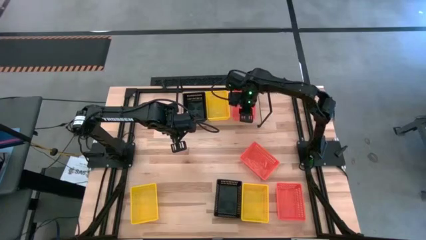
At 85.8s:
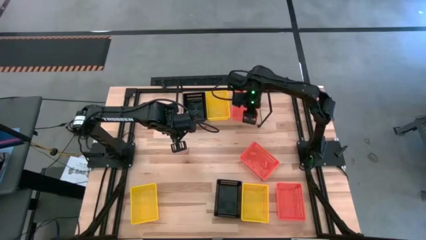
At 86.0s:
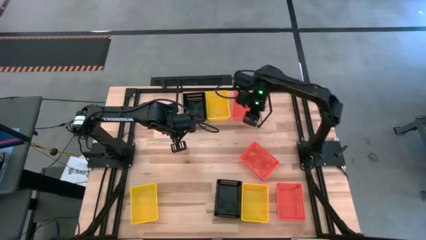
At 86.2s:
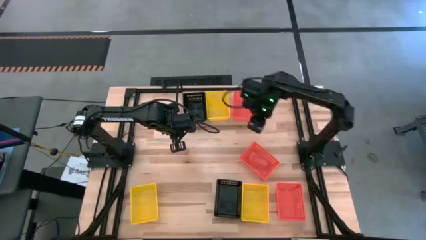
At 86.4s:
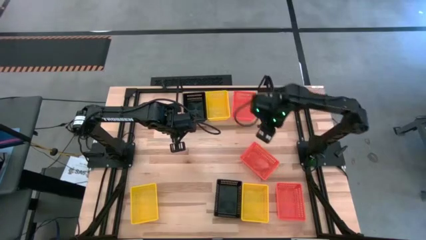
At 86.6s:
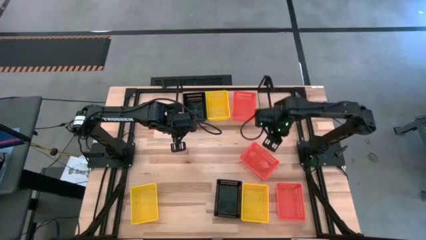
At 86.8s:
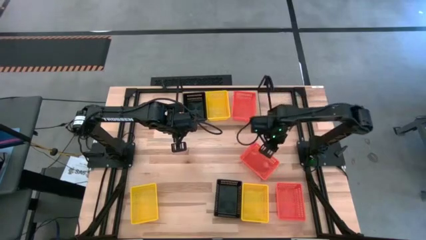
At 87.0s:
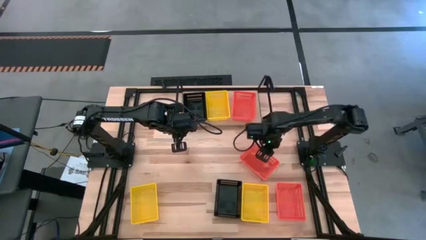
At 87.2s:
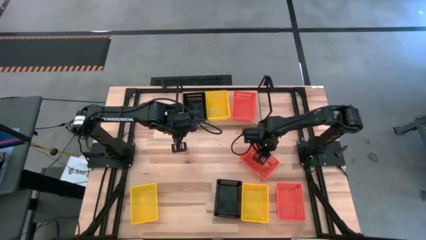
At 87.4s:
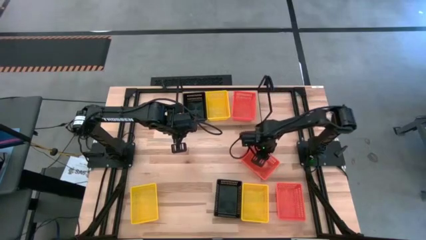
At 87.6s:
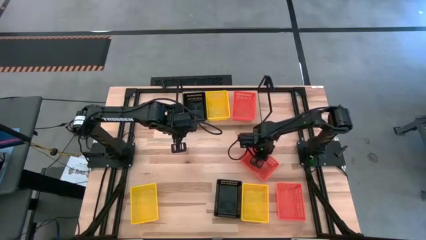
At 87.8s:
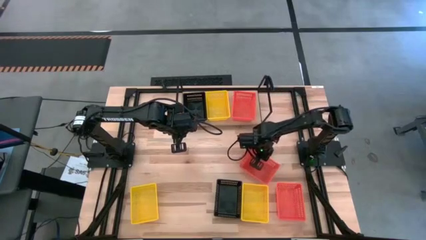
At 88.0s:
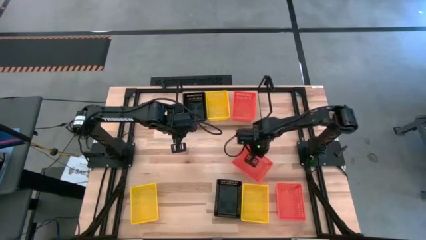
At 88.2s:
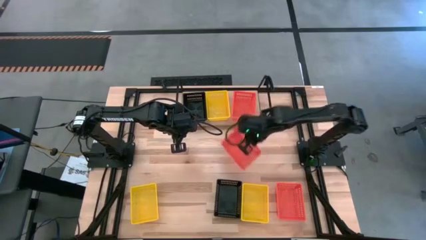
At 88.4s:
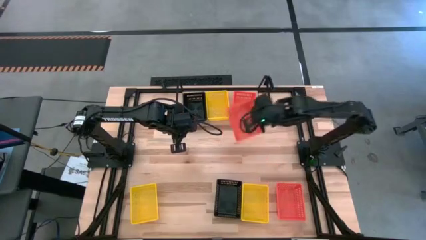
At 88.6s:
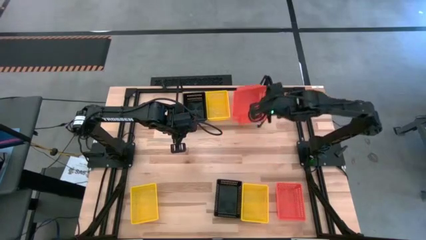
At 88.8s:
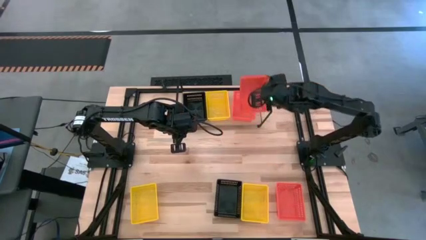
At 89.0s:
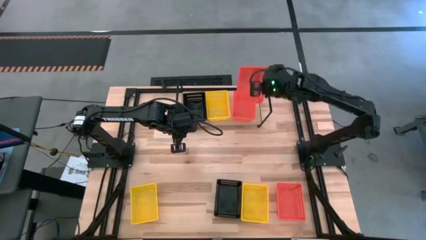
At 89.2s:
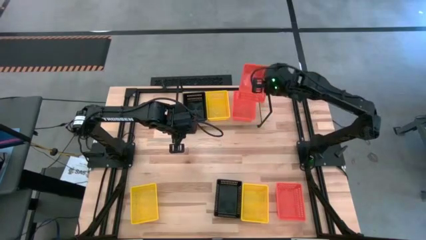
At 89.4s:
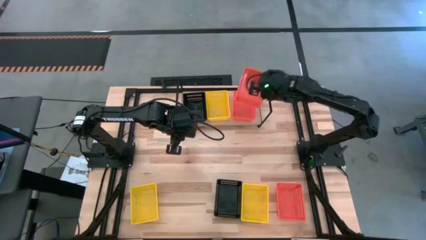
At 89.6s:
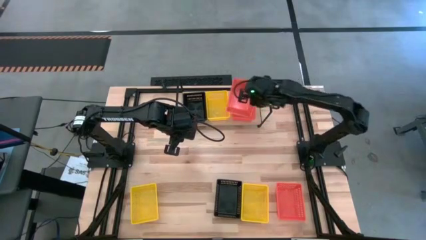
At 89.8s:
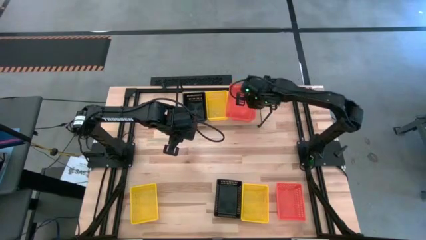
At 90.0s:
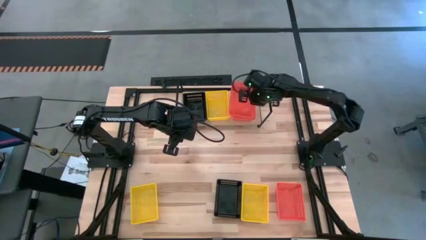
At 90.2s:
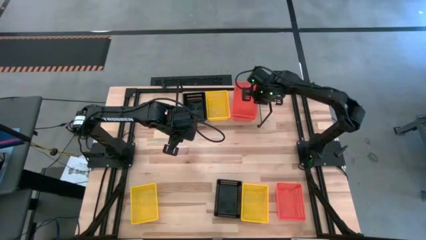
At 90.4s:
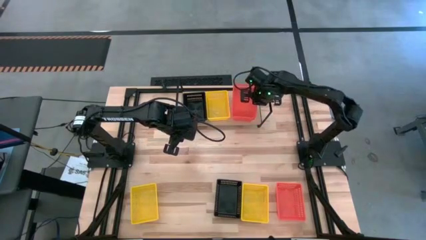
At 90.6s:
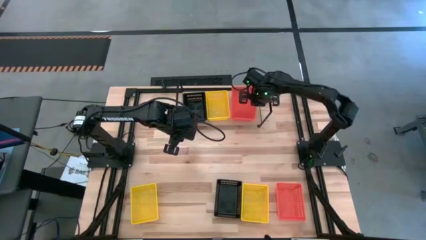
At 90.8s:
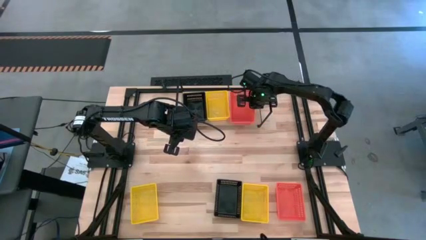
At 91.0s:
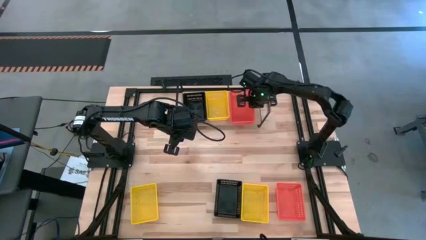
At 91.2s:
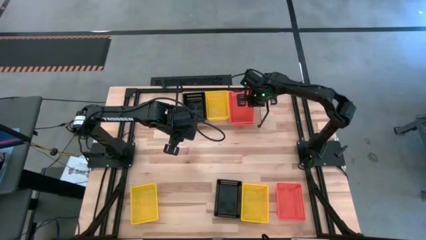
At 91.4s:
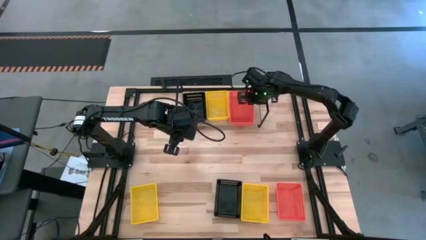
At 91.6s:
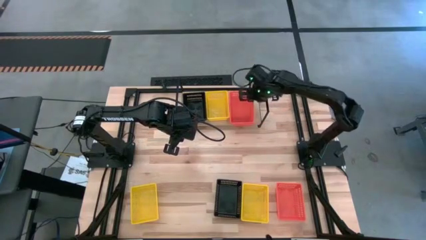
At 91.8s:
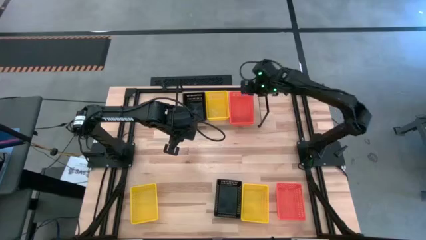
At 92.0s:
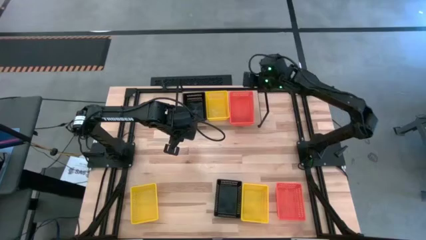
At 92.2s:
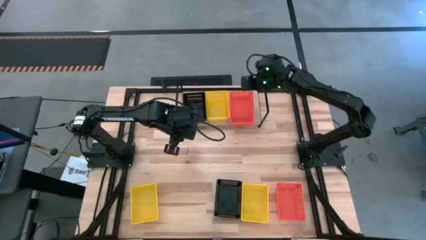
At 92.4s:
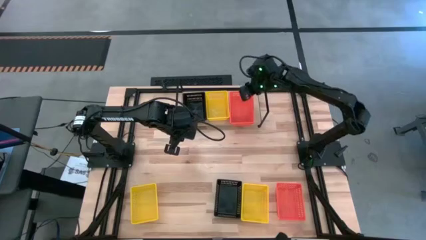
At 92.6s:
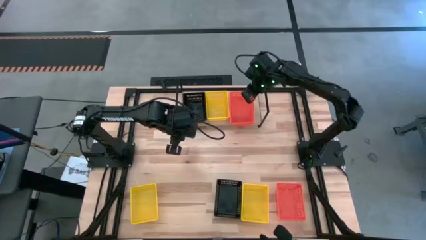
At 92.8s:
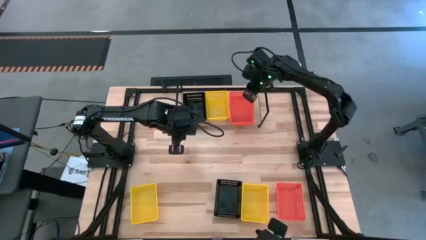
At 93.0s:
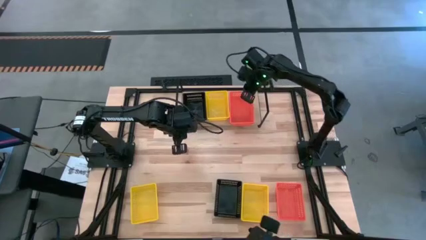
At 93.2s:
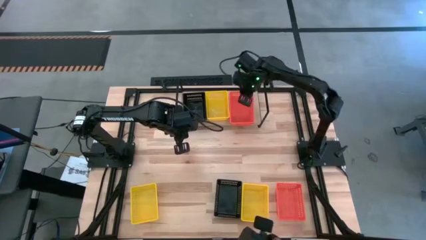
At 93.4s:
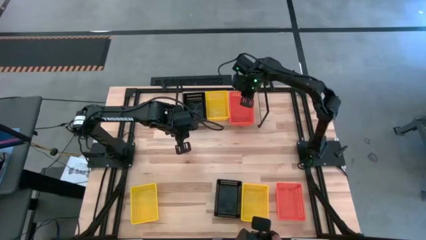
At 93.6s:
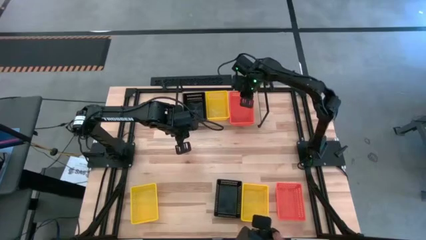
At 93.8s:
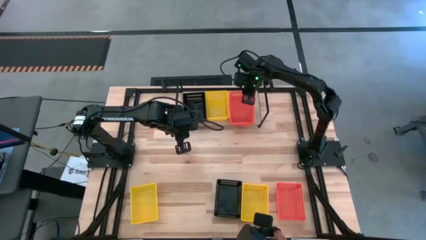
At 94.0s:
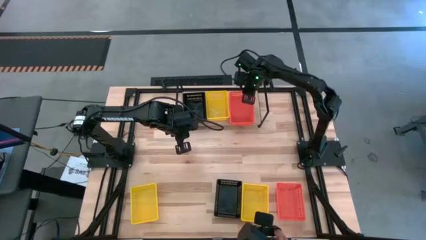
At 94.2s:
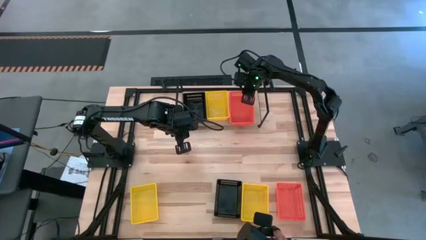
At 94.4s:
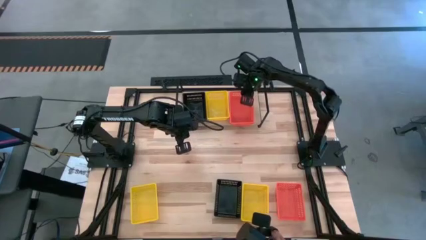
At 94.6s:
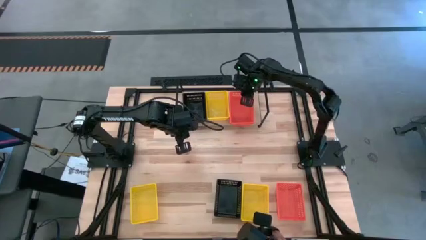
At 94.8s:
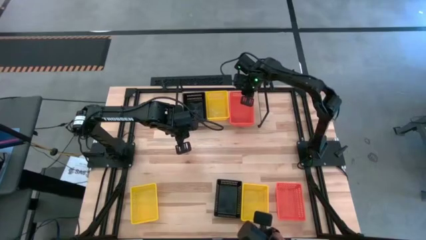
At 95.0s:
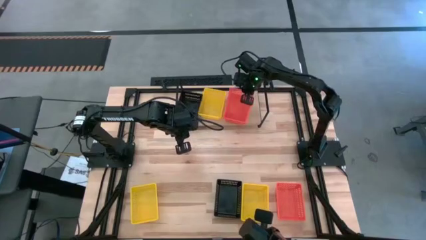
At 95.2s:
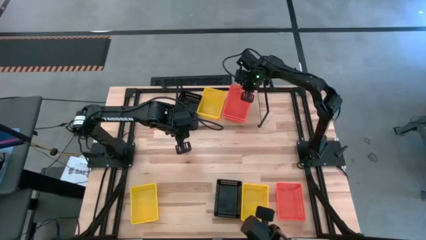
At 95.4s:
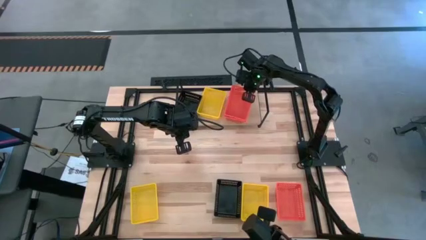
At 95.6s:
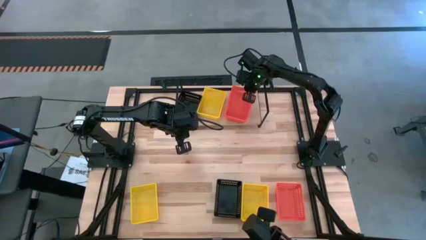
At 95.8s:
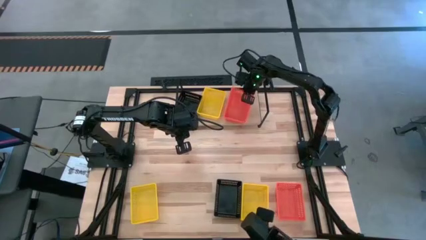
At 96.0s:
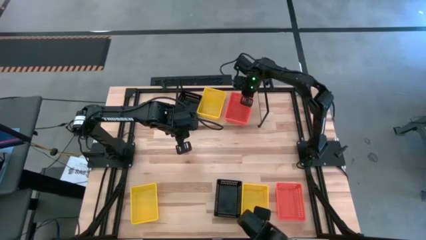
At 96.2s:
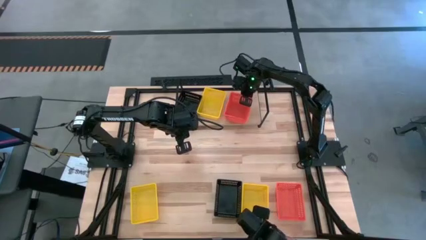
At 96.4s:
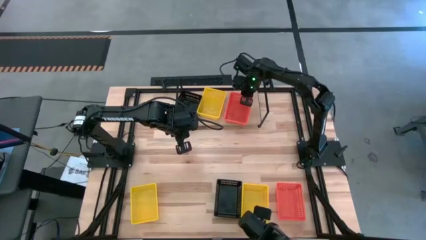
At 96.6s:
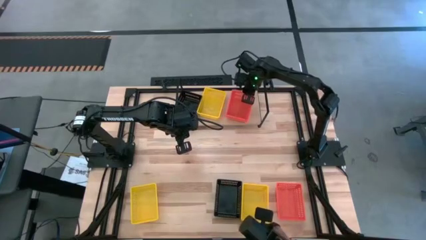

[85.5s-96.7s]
Task: Stack baskets on shelf by color
Stack the left orange bin on top of the other orange bin on the shelf

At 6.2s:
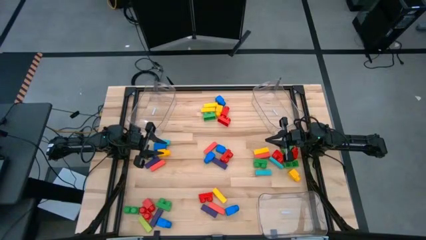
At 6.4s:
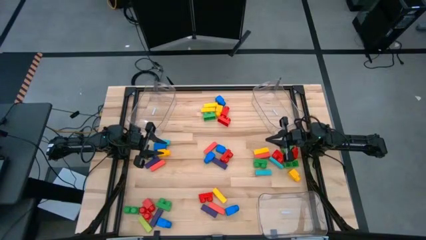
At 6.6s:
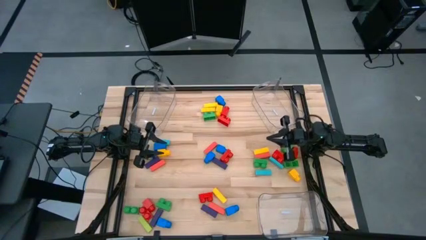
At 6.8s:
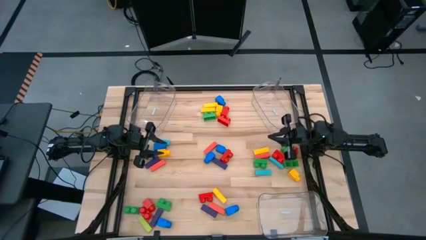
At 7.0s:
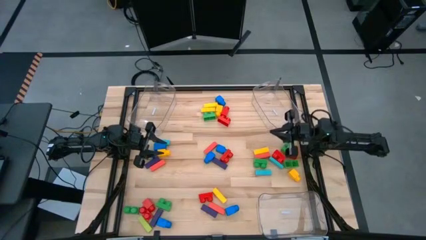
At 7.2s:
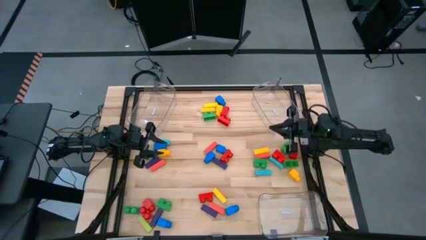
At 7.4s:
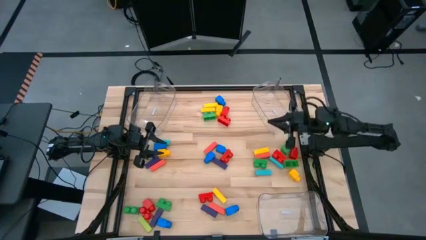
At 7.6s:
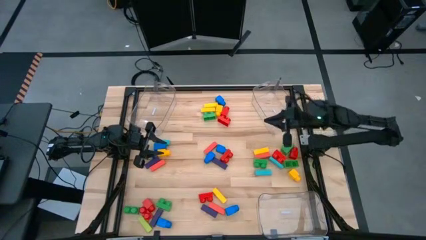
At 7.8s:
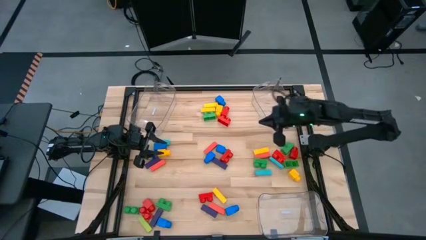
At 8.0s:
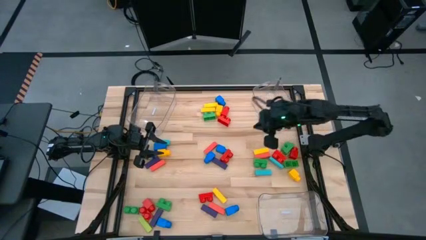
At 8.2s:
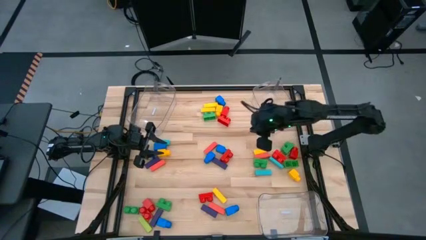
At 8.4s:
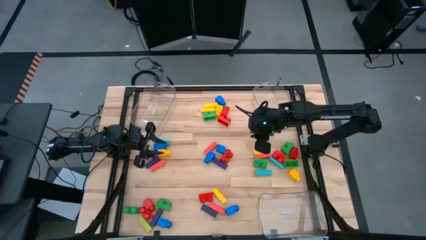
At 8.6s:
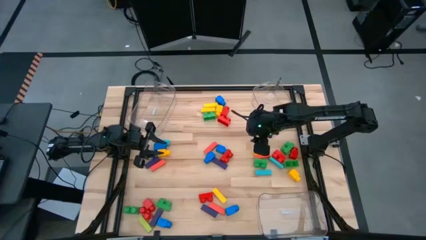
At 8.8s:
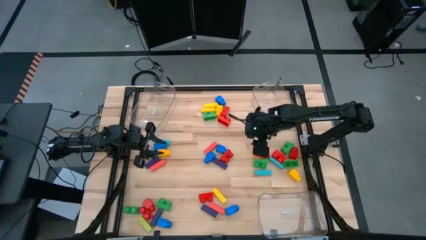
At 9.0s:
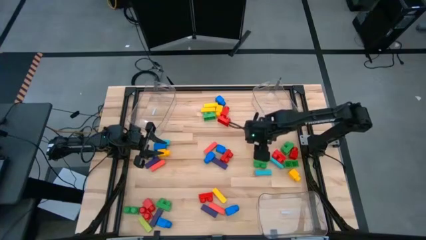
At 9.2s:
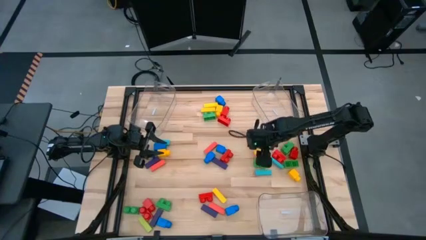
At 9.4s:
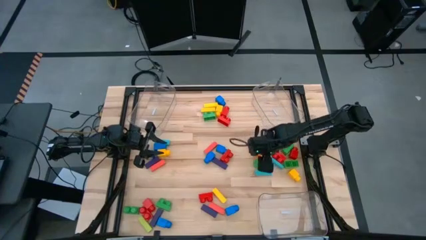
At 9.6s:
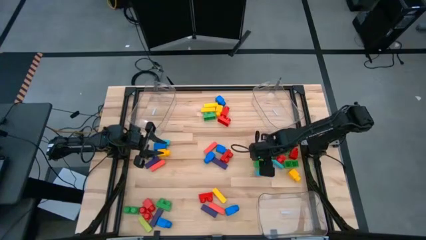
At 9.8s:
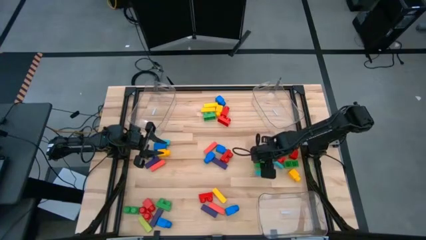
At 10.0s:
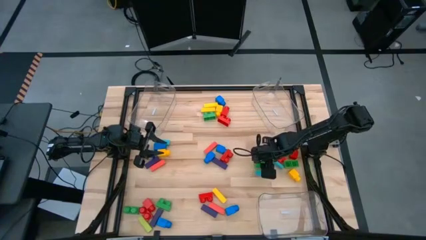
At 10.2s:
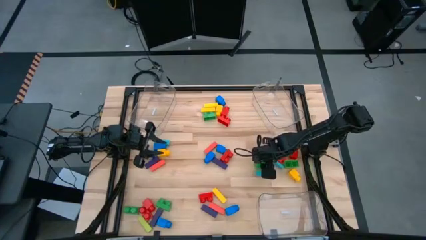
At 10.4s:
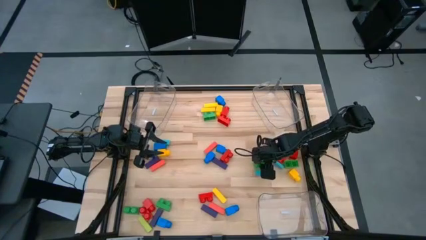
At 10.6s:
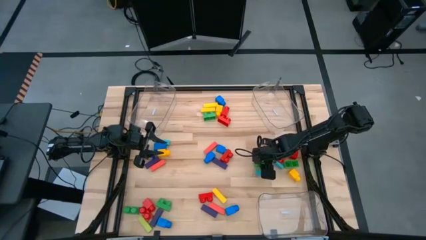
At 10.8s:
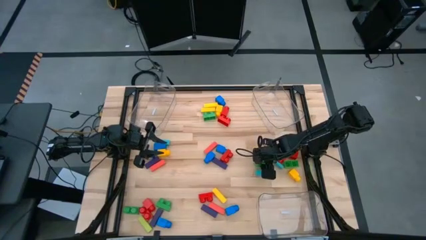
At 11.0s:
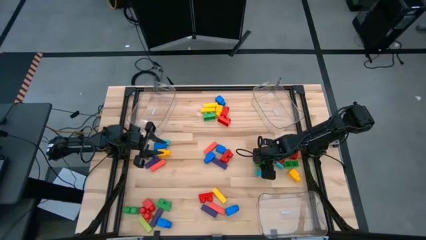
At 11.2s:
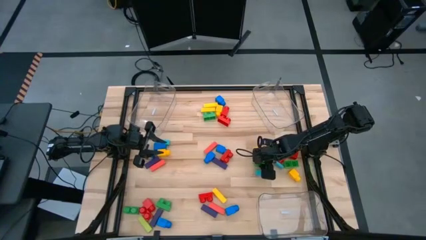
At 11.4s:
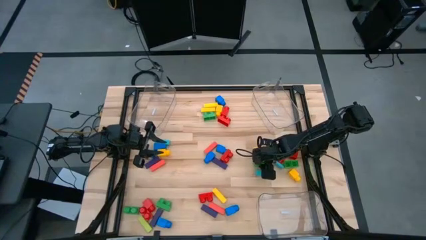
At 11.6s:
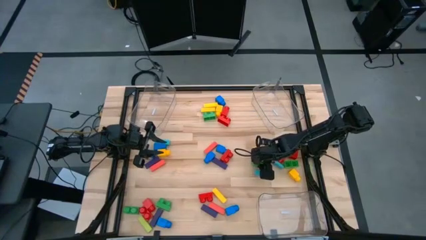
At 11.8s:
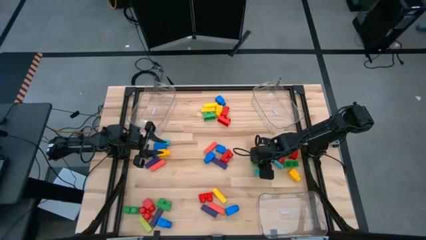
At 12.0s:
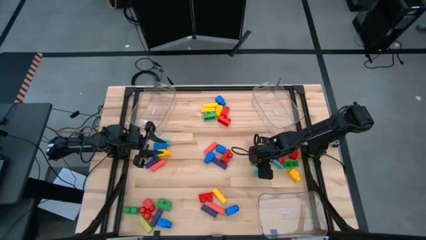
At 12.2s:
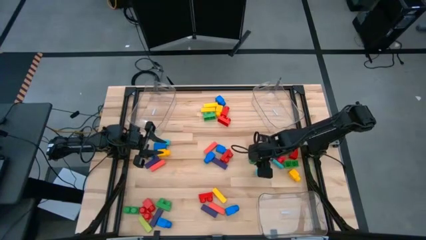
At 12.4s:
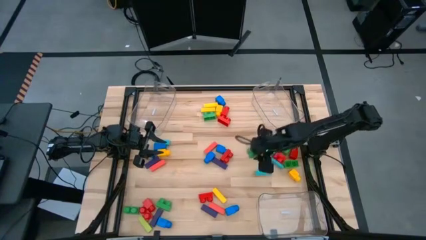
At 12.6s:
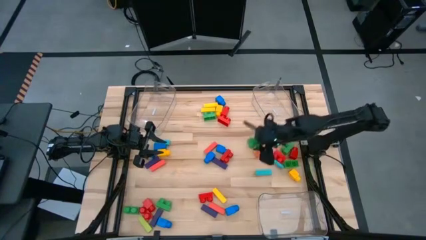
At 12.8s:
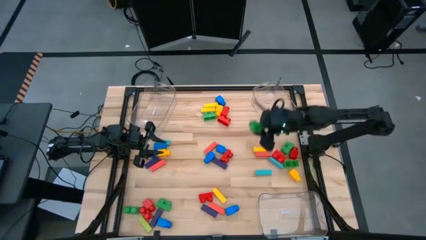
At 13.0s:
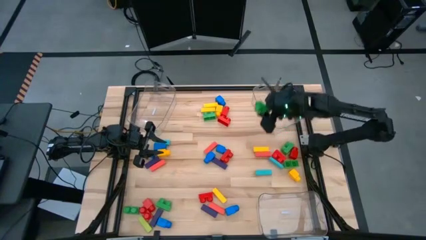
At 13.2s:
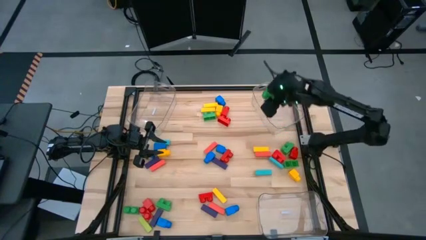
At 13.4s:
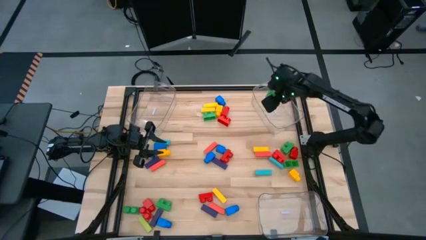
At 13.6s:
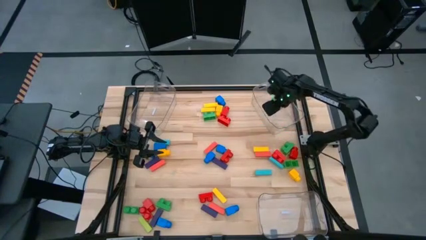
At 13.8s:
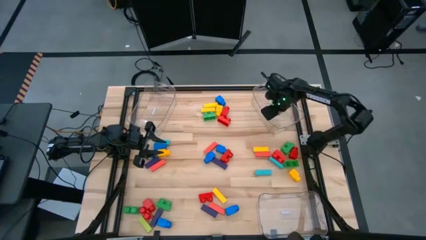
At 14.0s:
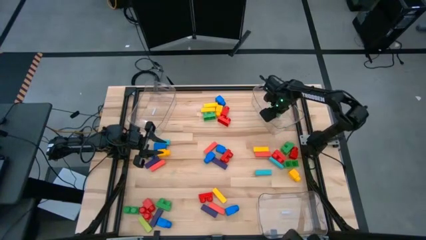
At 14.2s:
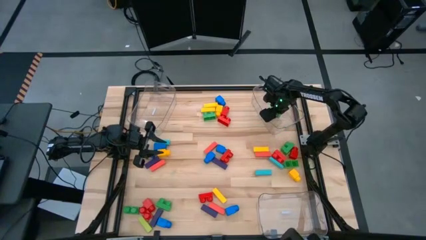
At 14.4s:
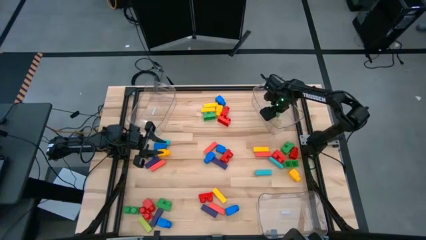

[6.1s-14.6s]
Task: Sort blocks by size
Put the green 2 stud game piece into the top right transparent bin
